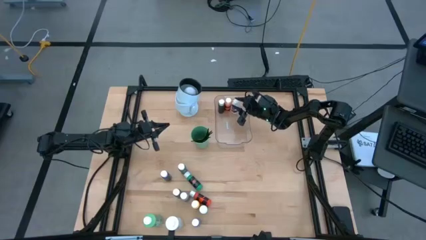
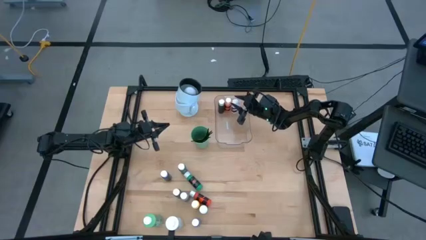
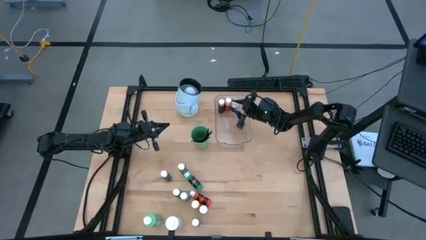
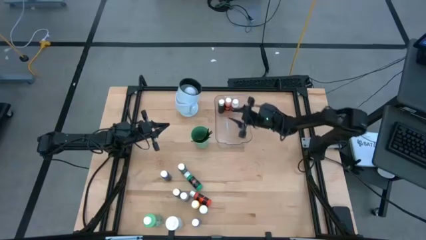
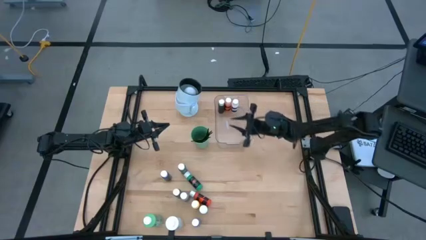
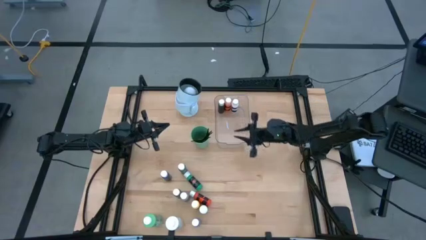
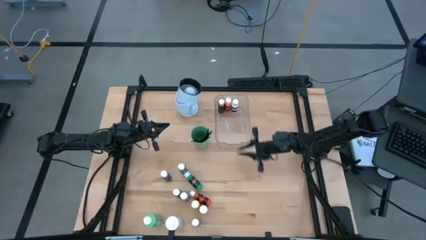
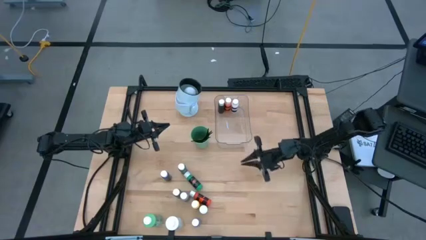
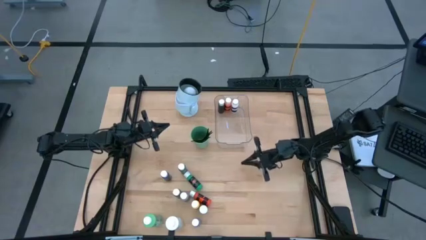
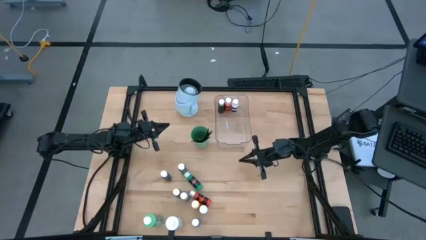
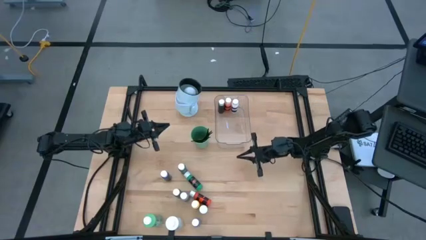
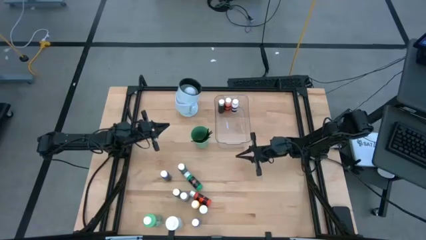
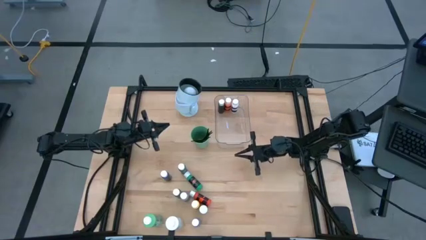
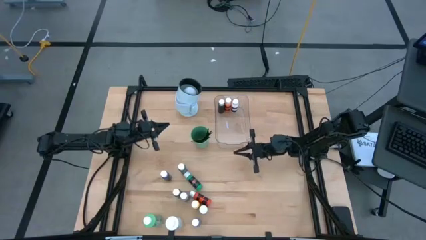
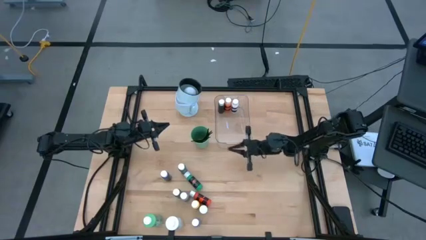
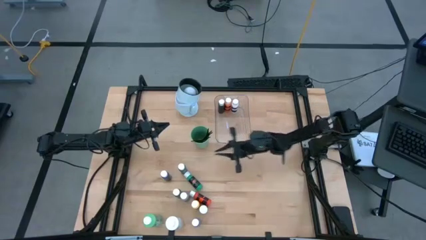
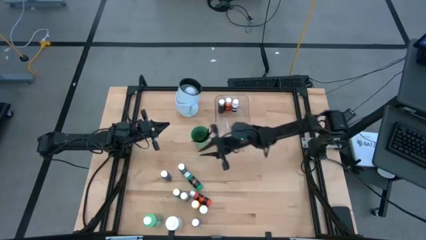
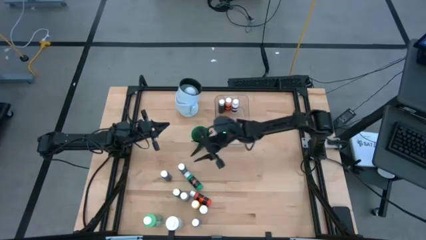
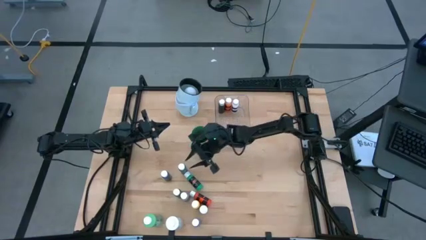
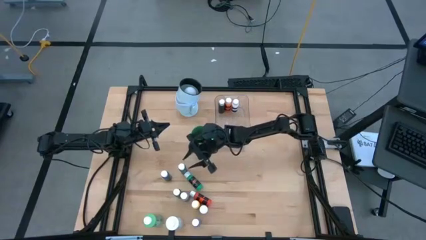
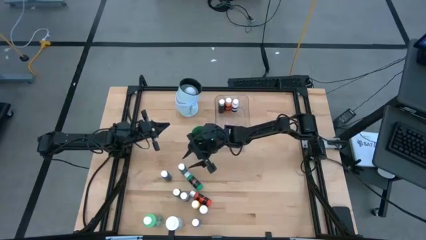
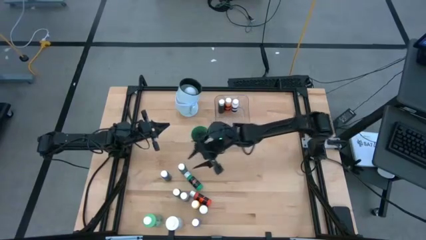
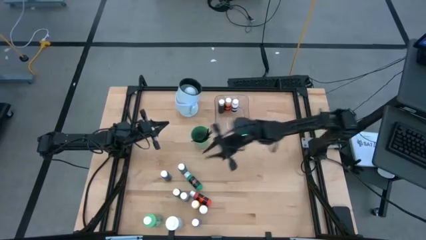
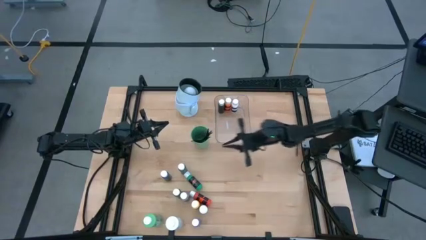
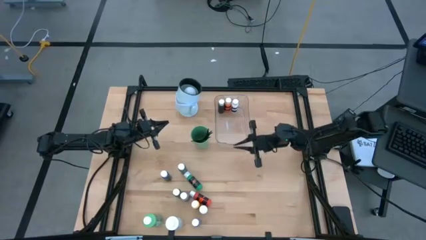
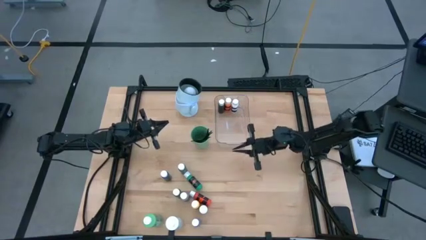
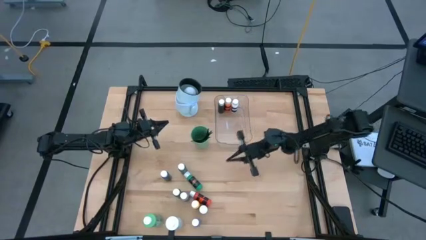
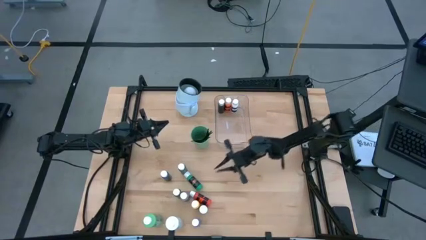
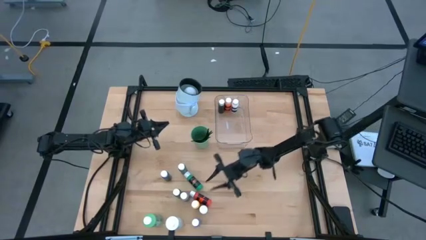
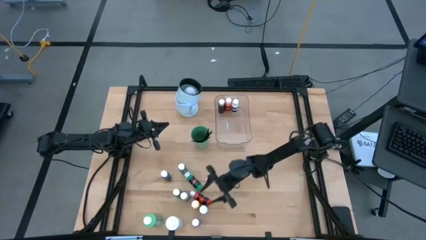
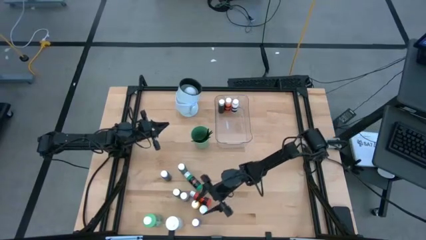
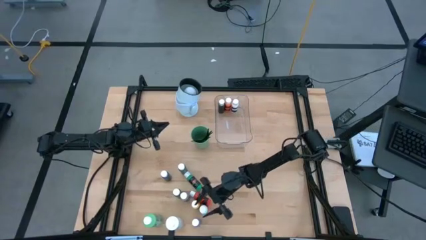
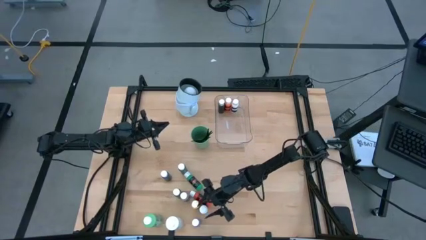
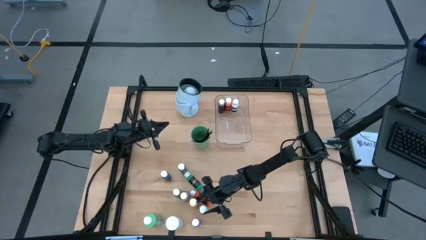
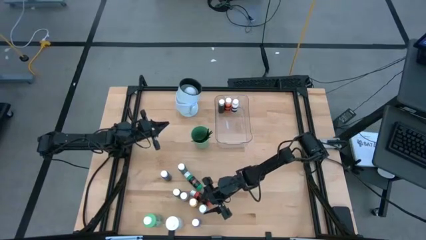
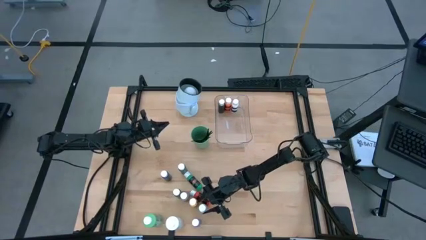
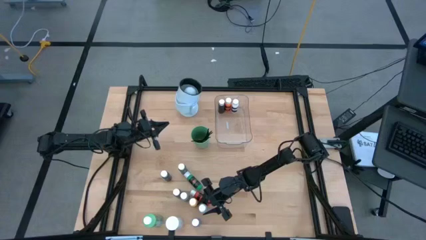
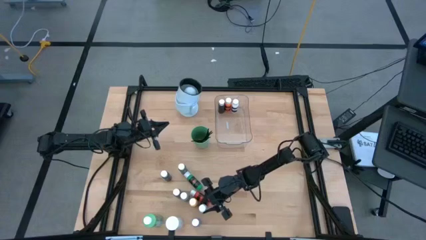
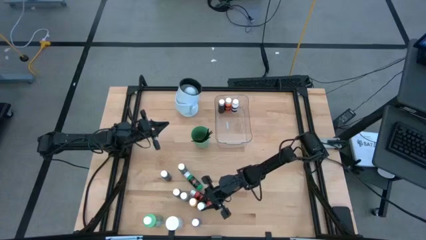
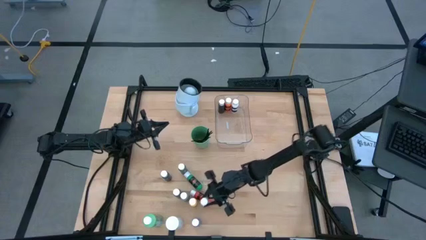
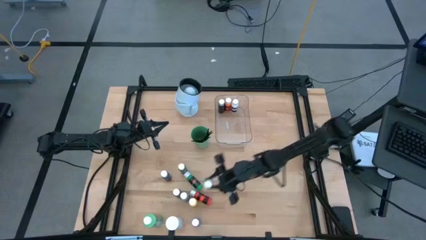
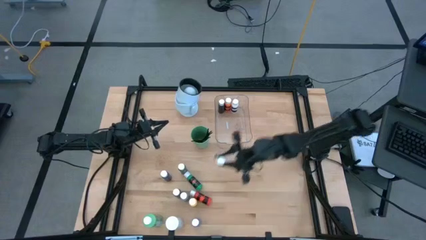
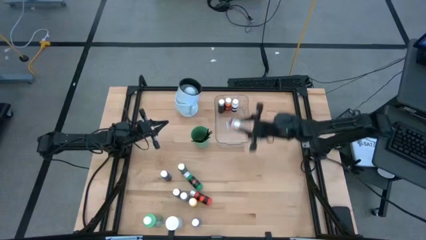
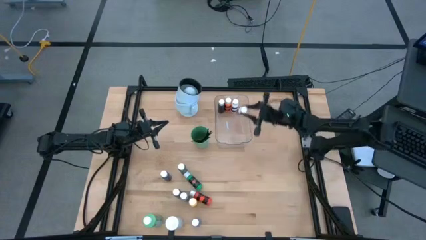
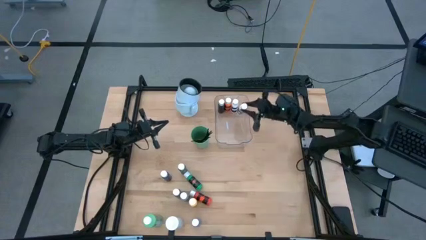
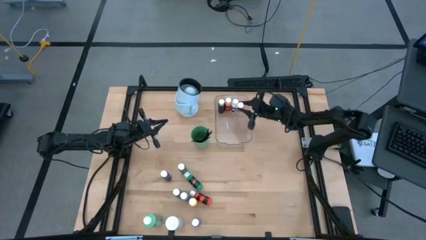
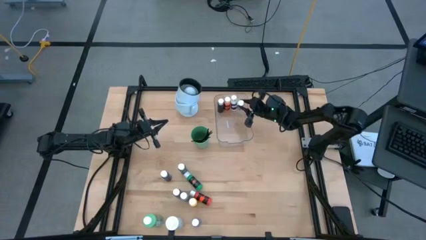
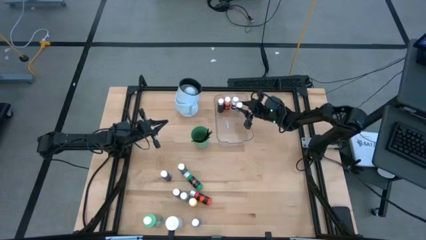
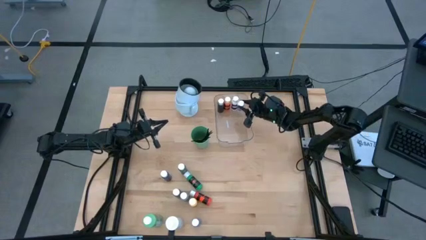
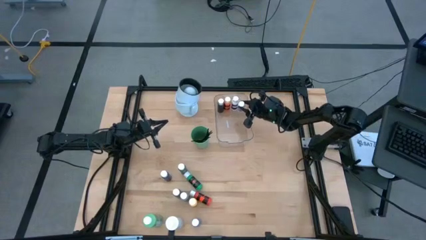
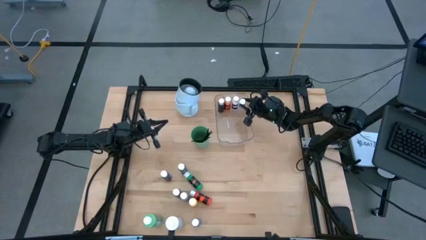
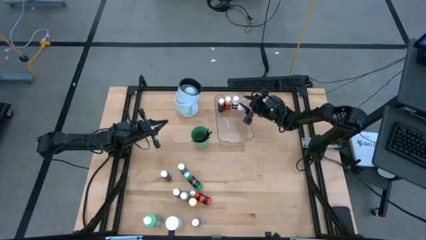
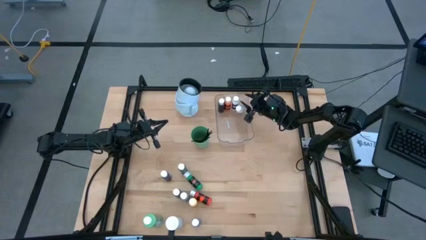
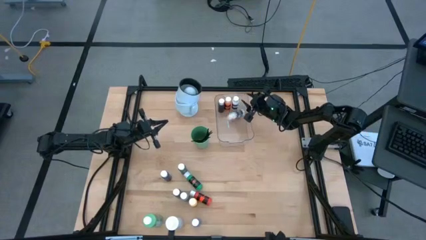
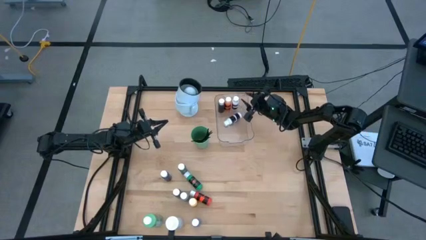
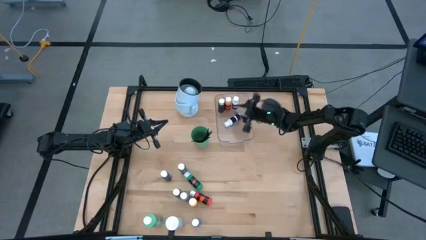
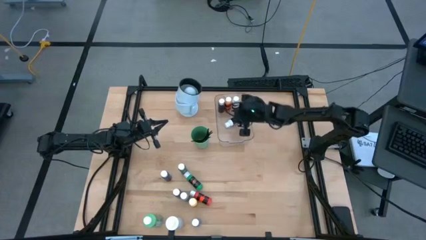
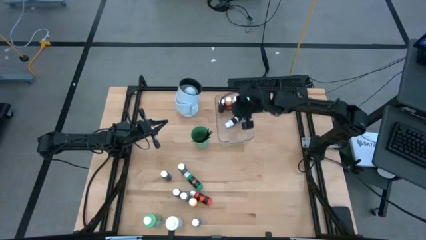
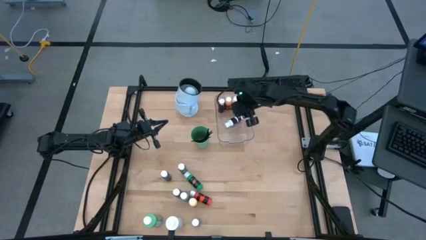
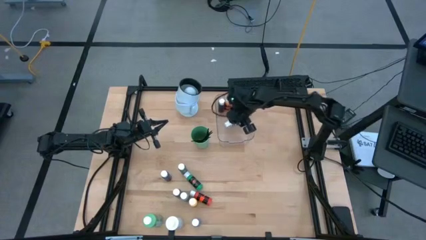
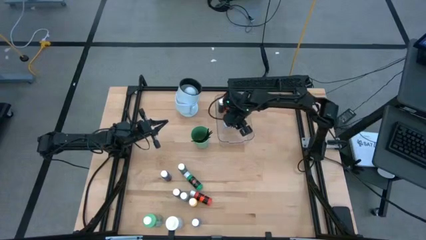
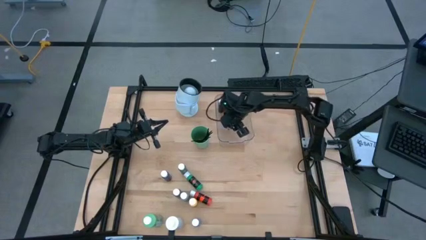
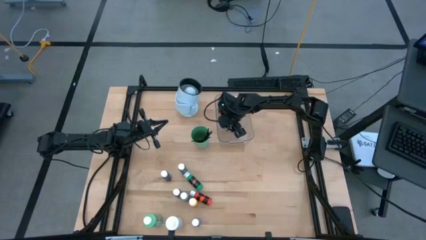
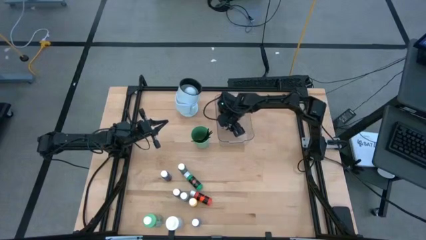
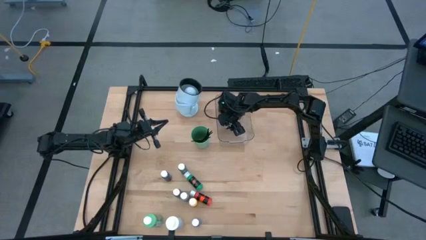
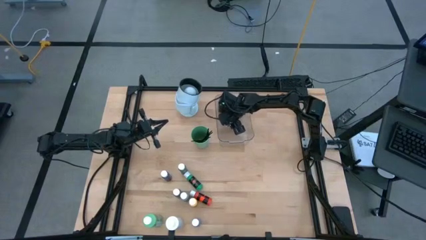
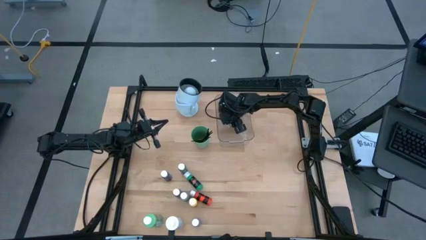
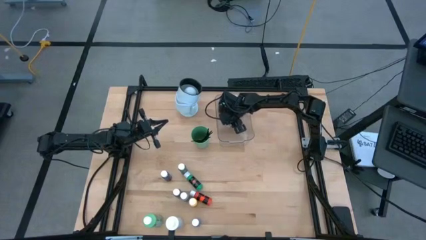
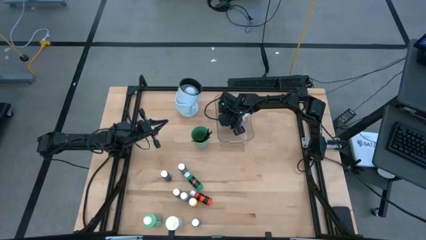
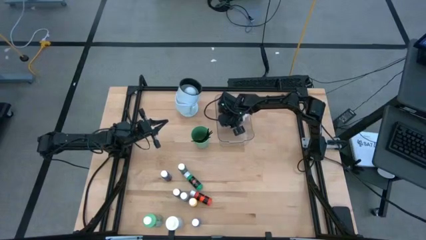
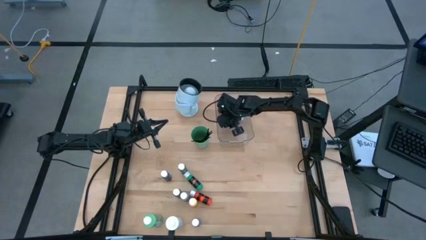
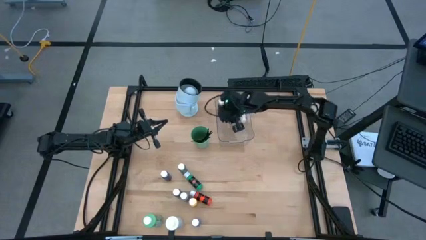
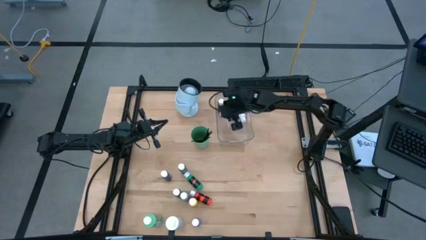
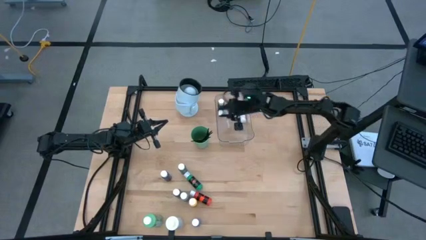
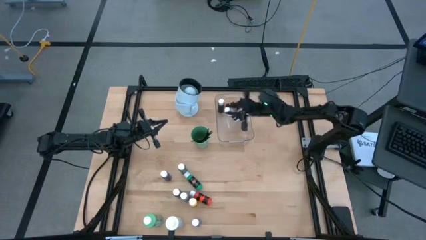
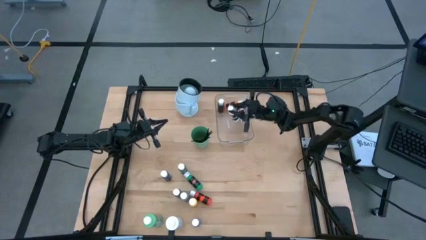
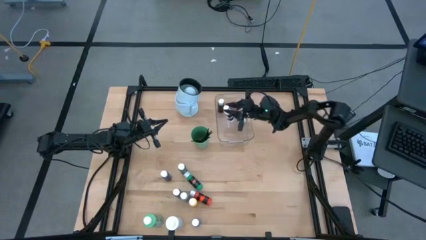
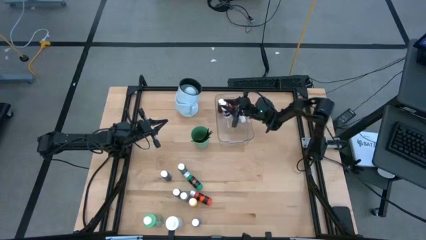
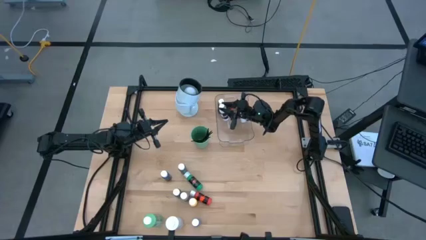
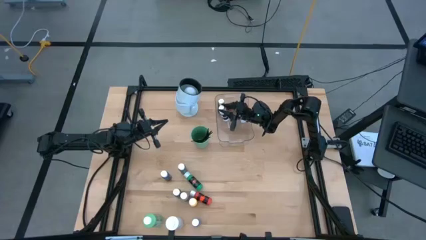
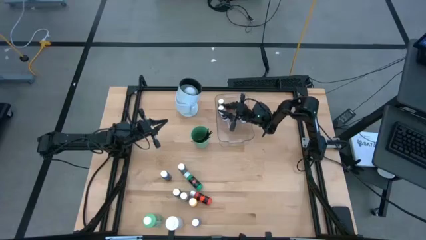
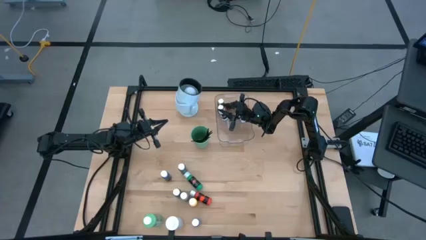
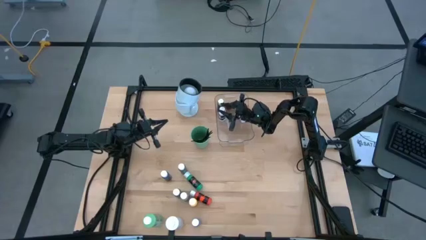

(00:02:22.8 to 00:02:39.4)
Task: Pick & Place Paint Supplies
Put the small white paint bottle into the transparent bin
